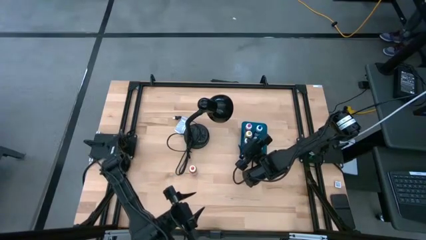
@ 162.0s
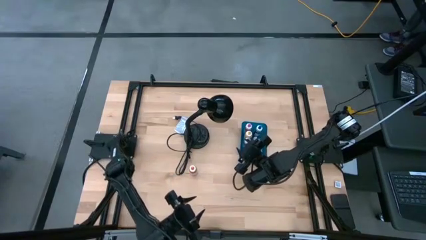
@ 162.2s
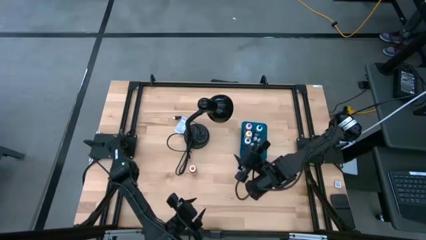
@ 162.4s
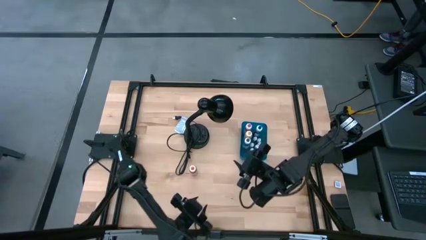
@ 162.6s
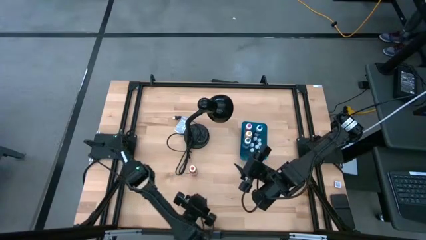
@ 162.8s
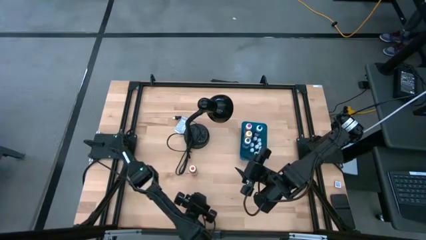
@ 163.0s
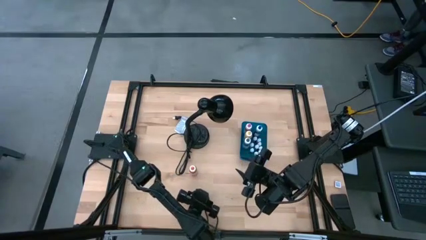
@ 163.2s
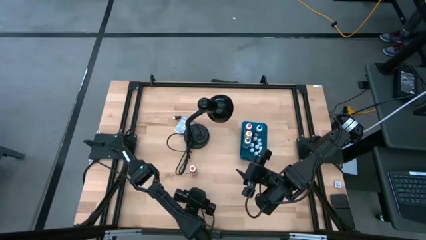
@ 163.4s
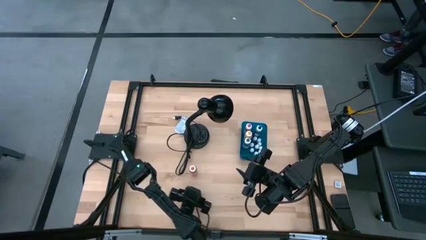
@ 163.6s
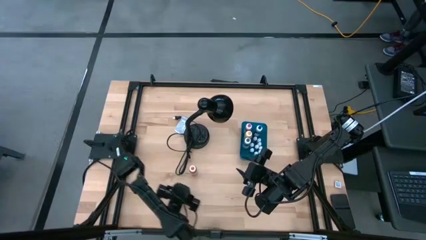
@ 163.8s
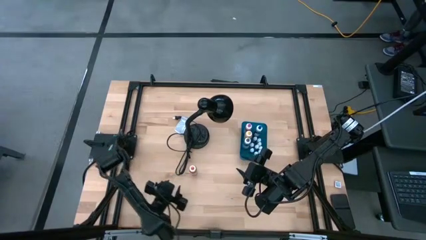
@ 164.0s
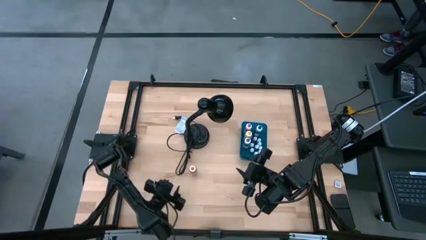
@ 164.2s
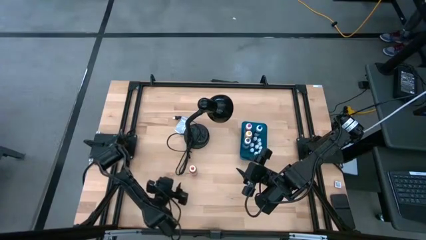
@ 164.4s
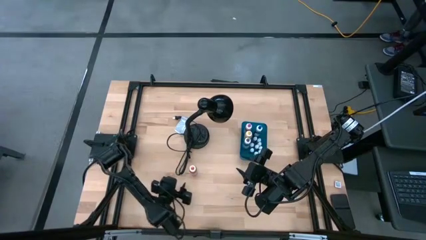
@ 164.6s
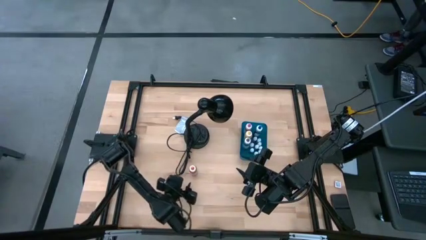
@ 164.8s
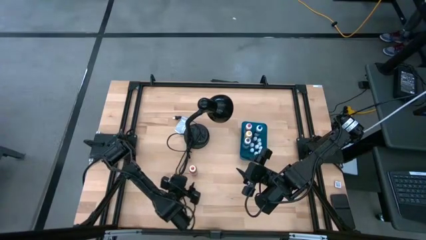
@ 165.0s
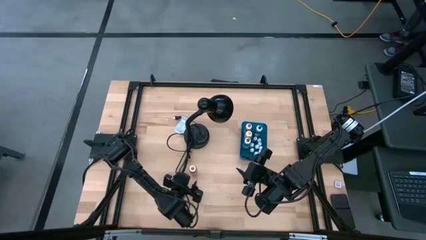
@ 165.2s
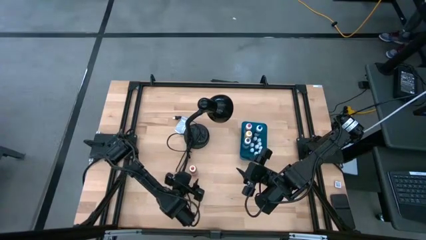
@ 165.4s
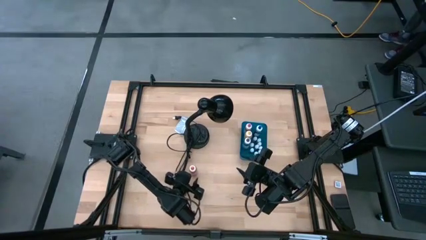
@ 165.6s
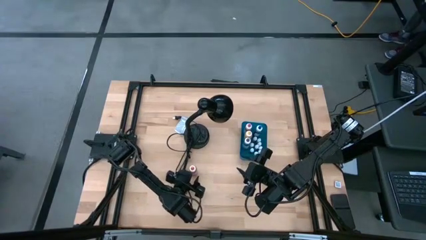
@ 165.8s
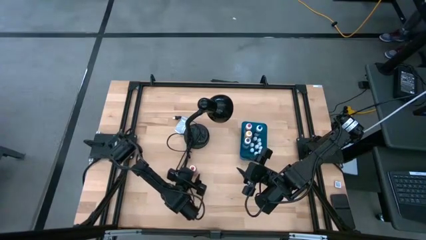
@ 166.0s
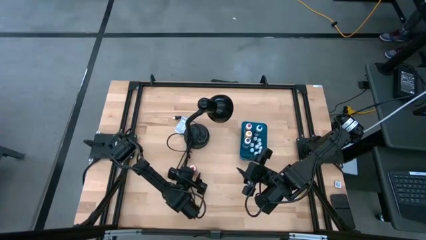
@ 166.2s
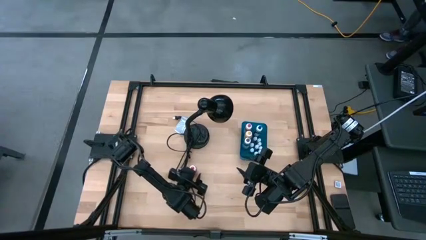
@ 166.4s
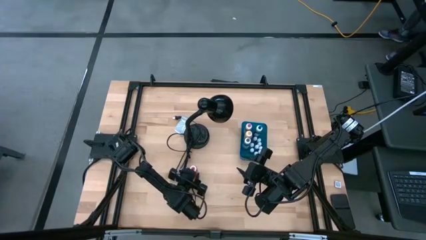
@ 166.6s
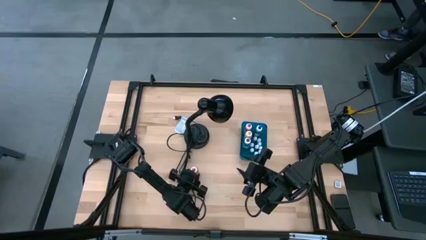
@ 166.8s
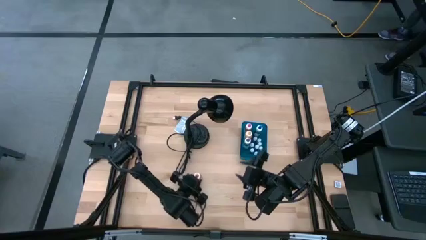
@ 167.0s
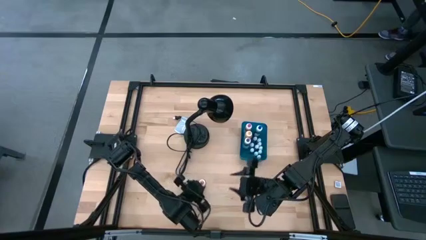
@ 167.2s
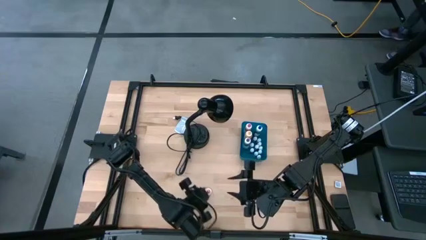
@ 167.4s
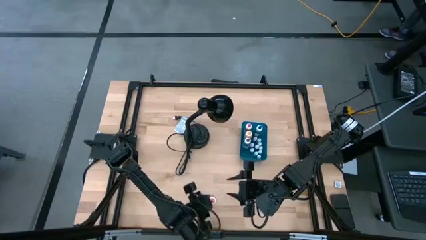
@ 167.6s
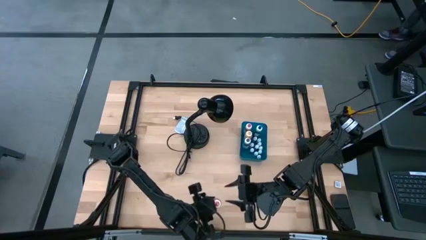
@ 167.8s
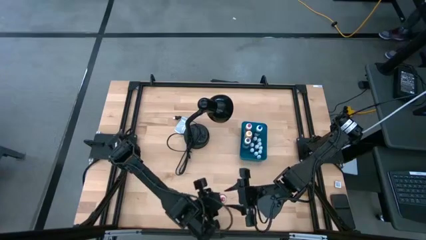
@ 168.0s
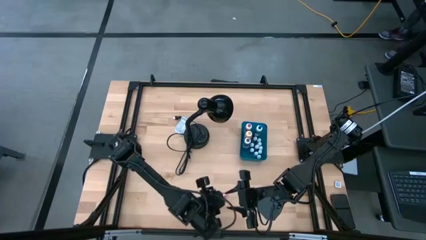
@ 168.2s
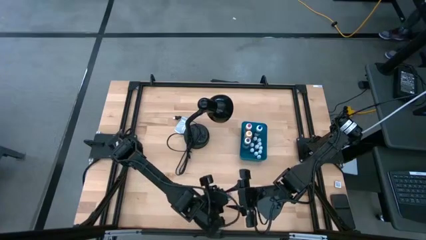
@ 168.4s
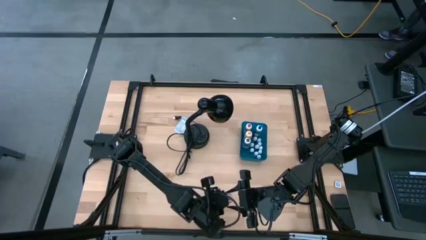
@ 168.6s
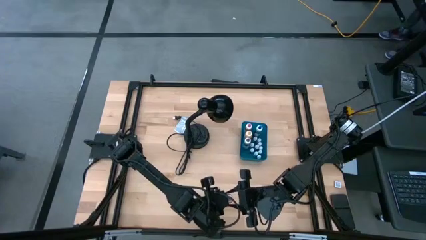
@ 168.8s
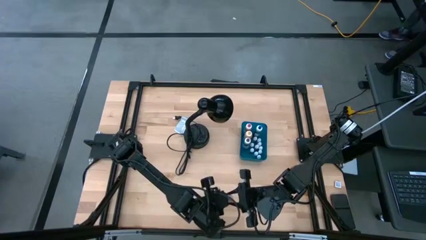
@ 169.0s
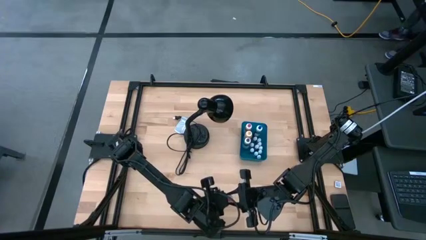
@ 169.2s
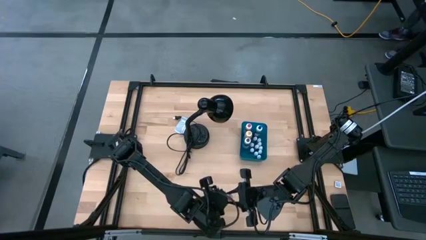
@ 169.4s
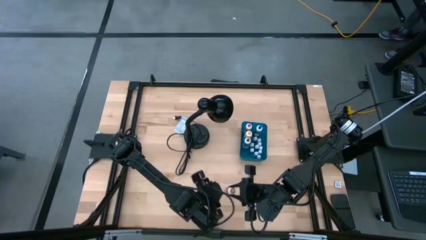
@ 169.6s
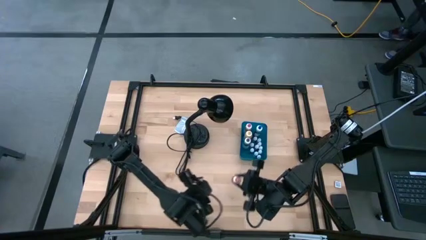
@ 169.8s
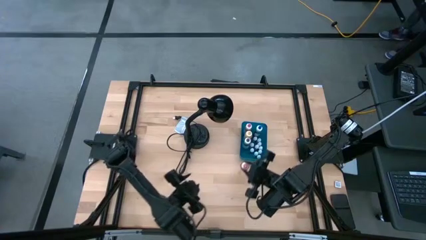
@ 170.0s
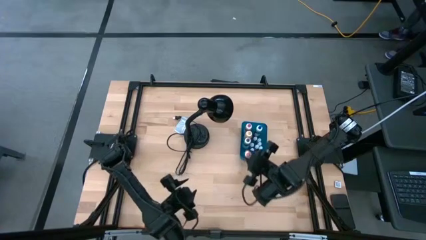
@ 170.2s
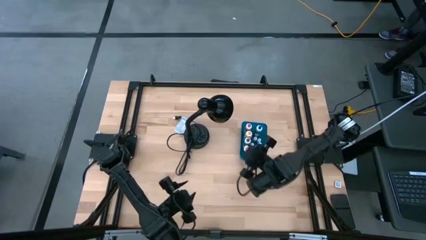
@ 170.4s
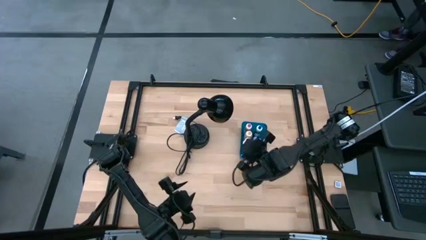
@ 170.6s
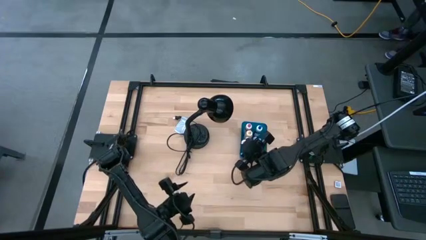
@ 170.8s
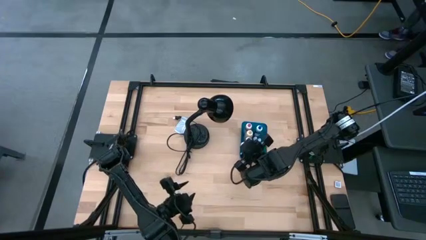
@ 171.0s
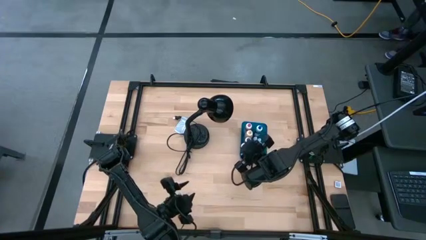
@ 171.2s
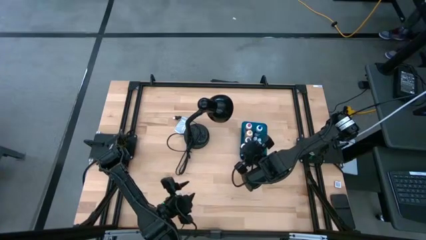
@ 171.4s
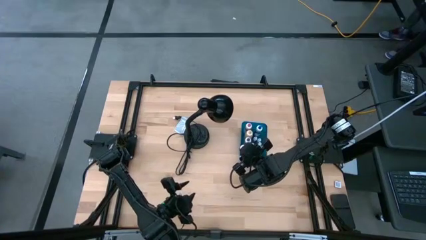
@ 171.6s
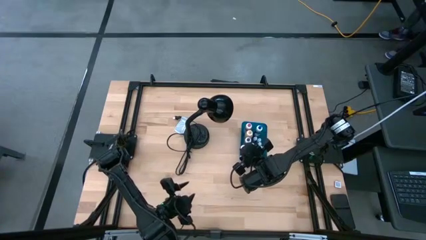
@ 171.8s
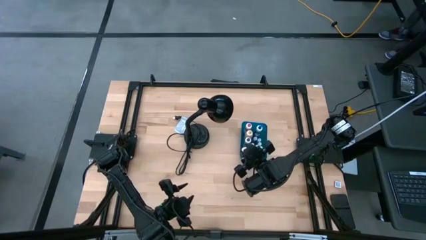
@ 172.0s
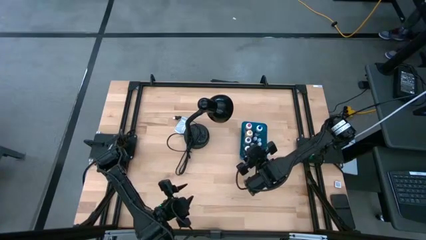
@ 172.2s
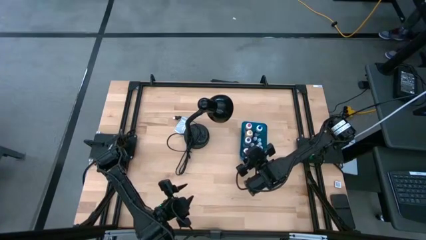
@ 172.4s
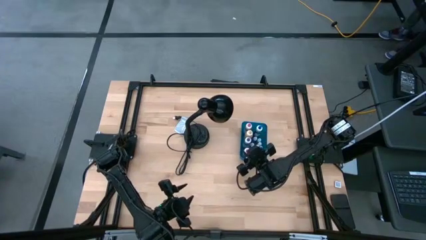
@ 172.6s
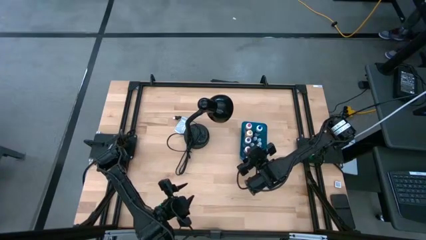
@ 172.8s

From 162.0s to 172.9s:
Task: Pick & Place food coloring
Put the large orange food coloring bottle into the blue bin
